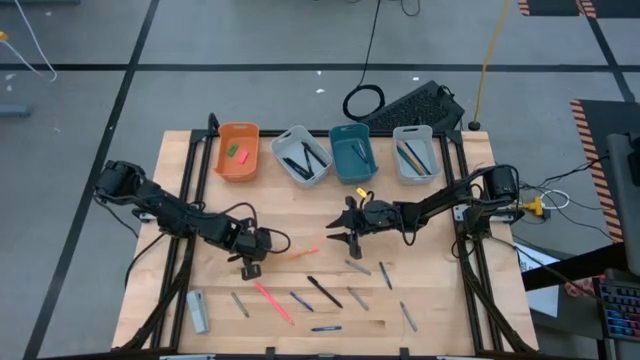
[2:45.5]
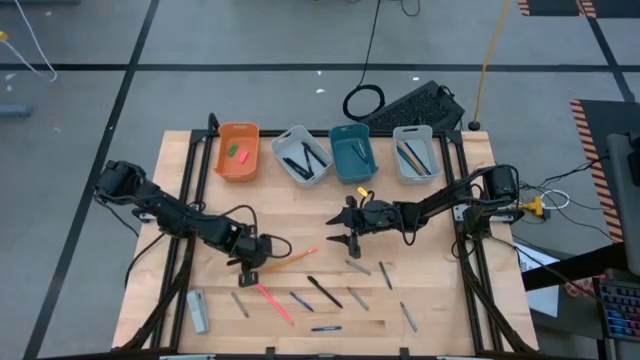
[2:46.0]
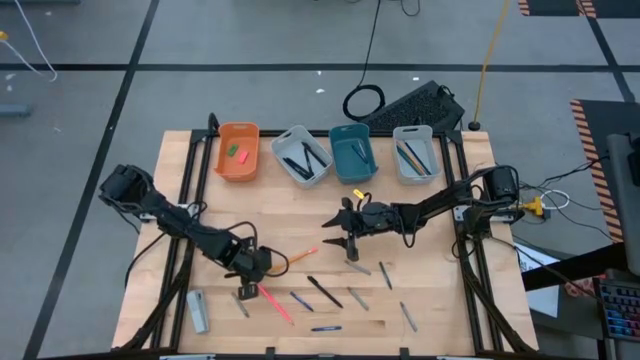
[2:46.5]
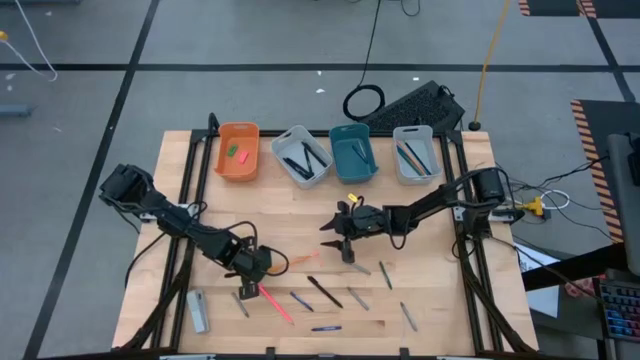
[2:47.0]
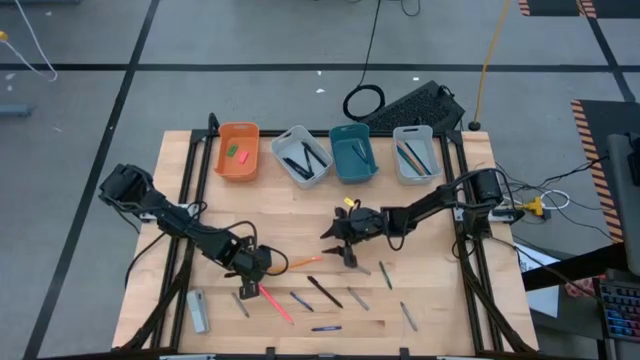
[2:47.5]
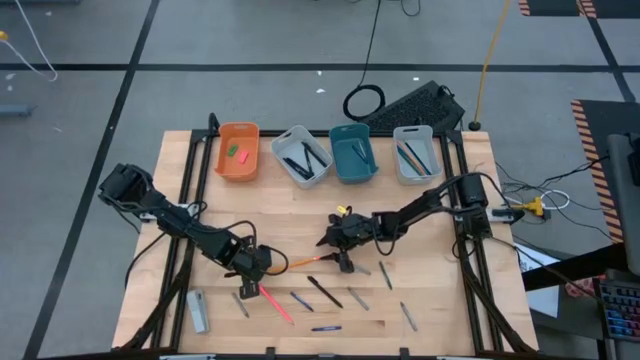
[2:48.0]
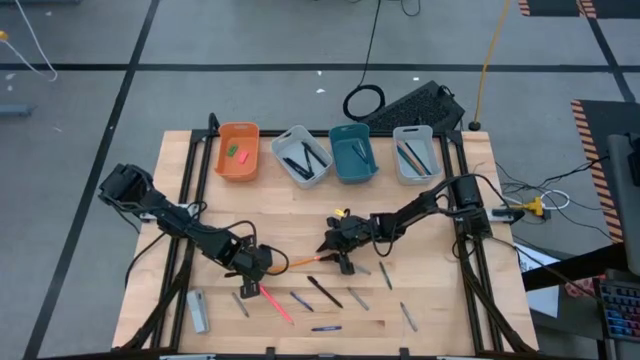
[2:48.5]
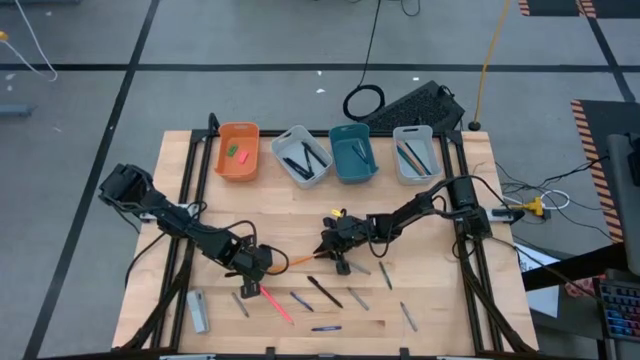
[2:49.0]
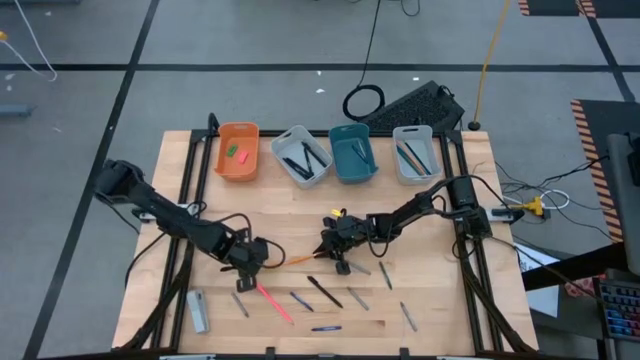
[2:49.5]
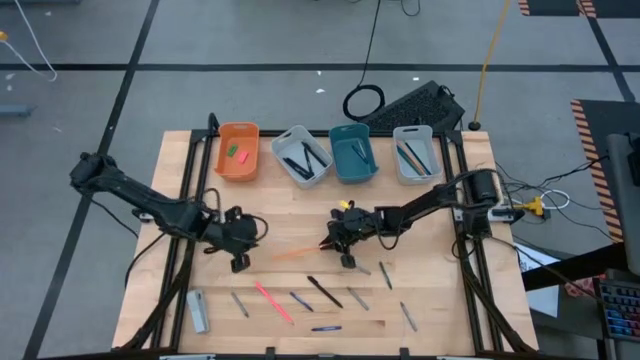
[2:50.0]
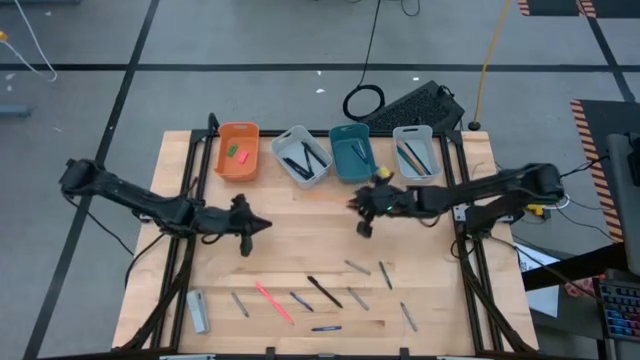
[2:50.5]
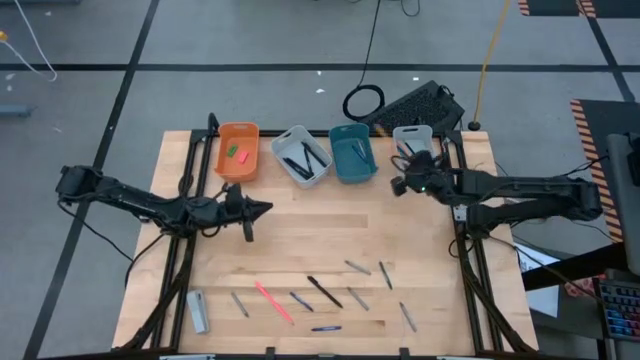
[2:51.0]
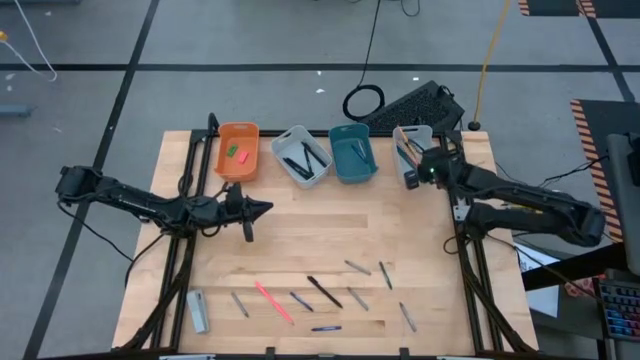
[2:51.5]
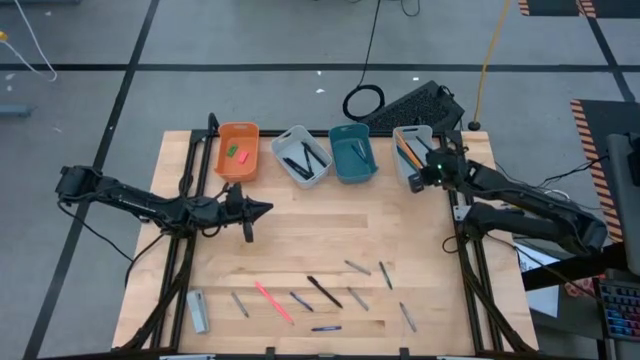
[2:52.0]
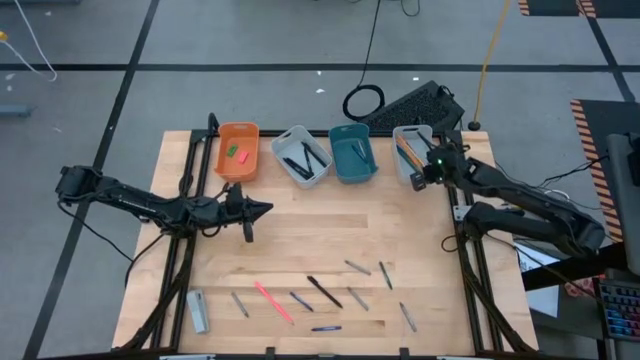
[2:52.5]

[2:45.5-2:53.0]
Task: Sort crayons/erasers/pens/pencils in bins
Put the orange pencil into the right gray bin

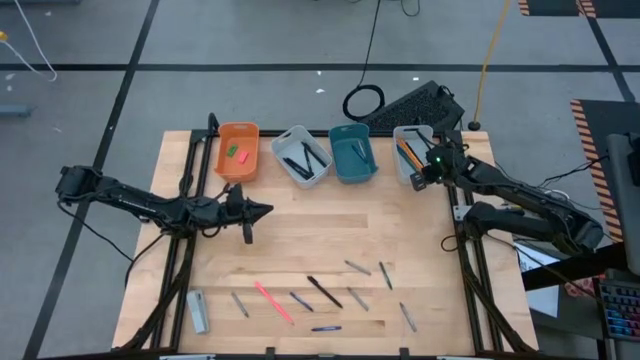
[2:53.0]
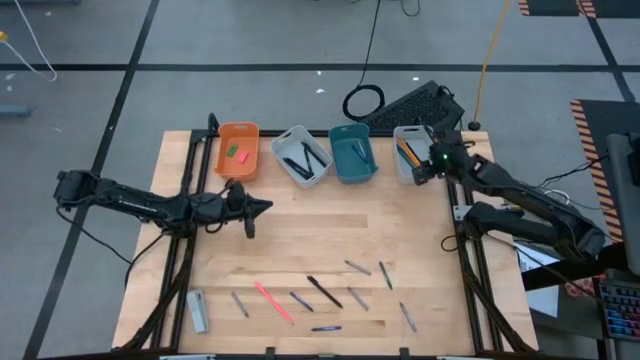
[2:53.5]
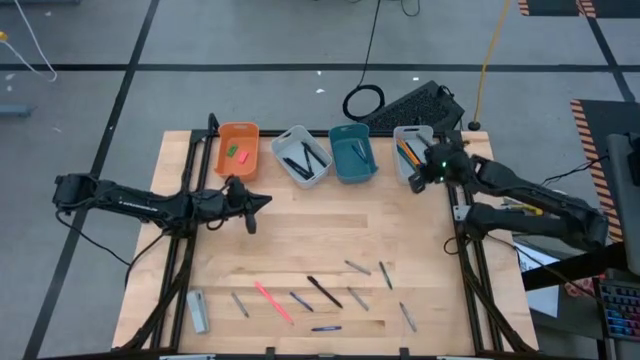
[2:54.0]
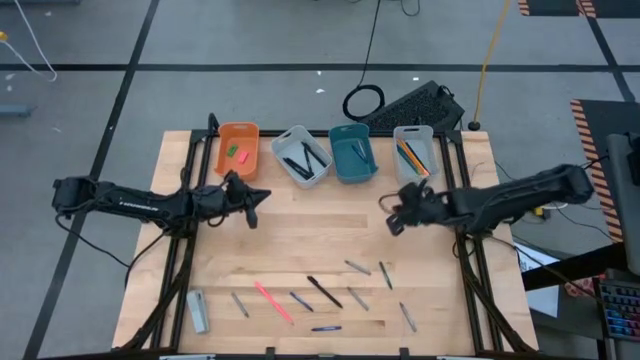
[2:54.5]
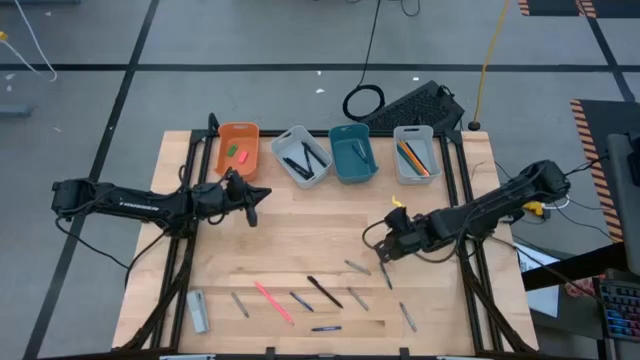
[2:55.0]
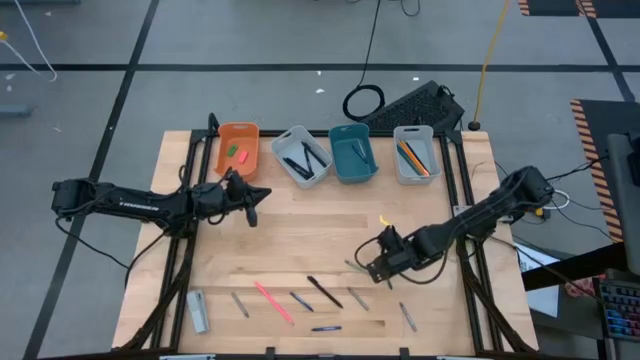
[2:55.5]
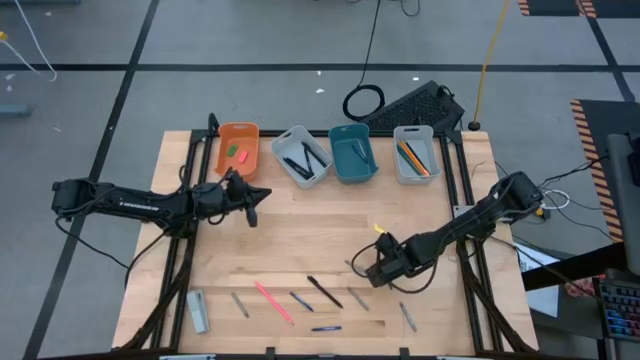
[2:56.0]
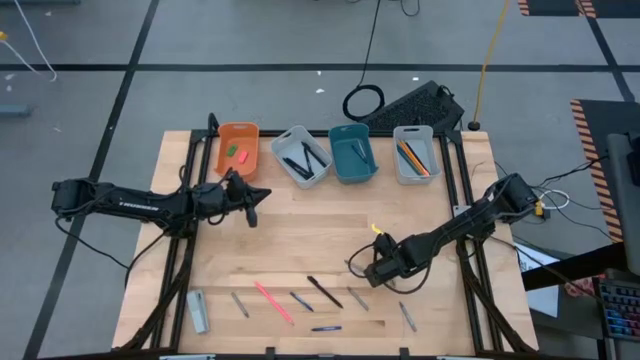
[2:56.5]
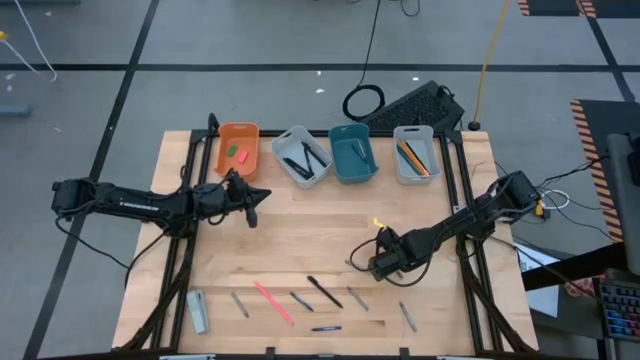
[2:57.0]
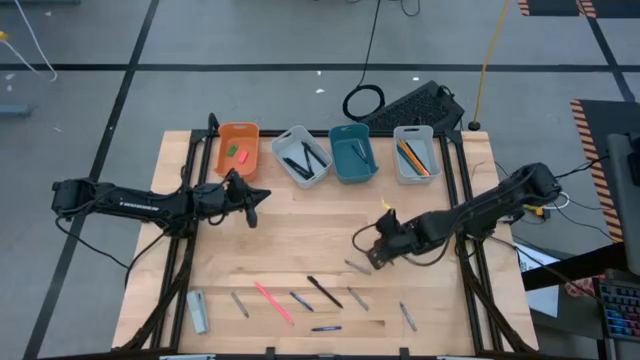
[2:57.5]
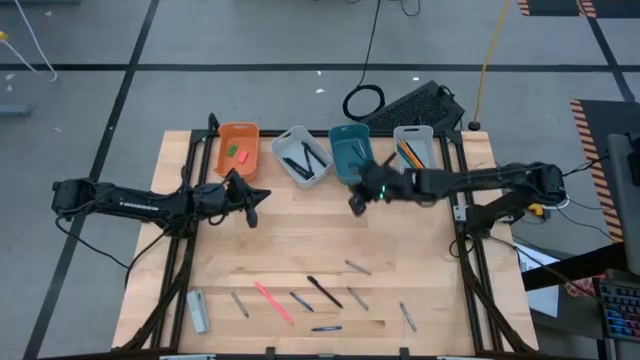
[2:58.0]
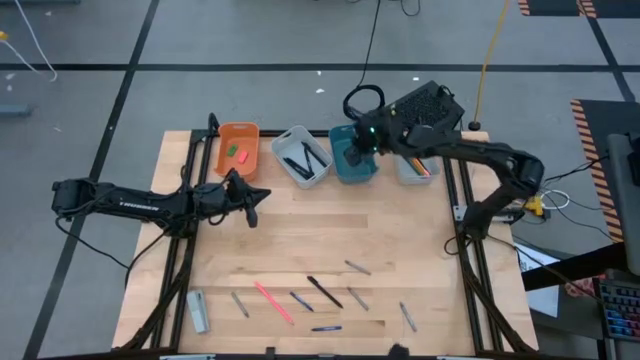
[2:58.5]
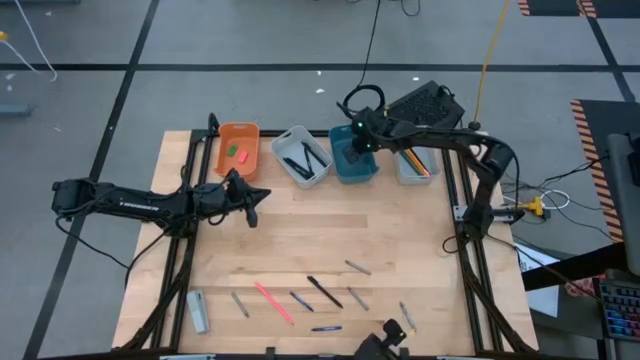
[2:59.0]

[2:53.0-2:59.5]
Put the dark green crayon into the blue bin

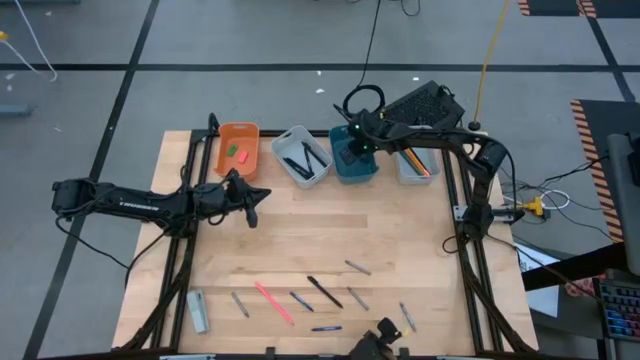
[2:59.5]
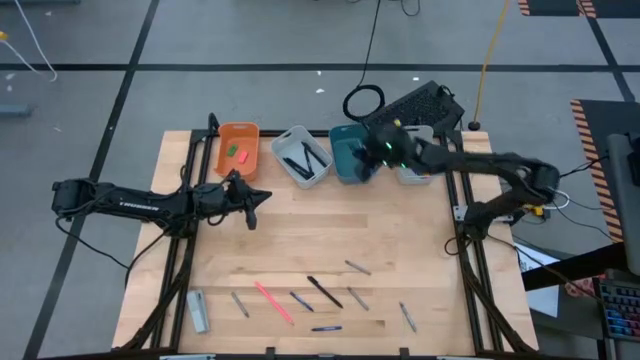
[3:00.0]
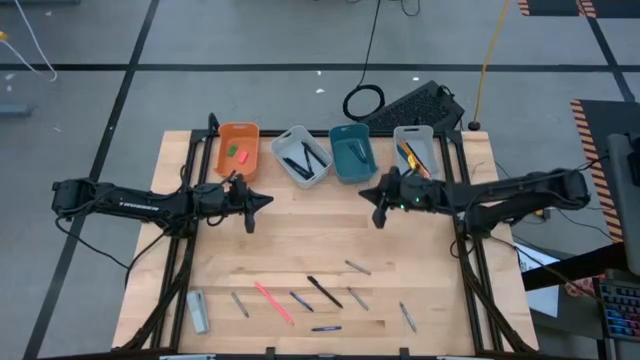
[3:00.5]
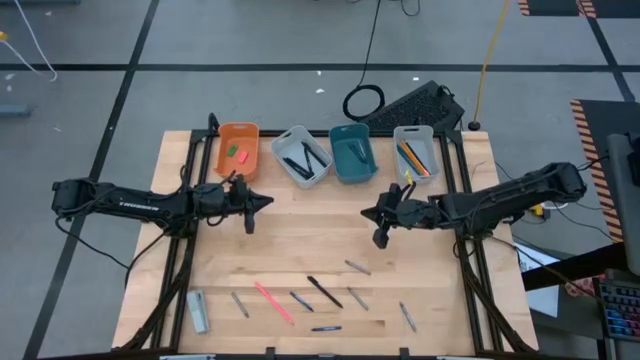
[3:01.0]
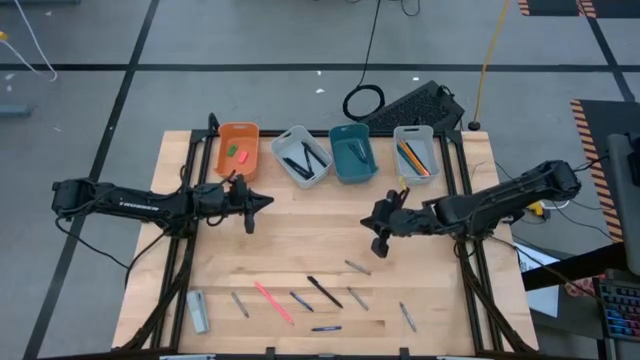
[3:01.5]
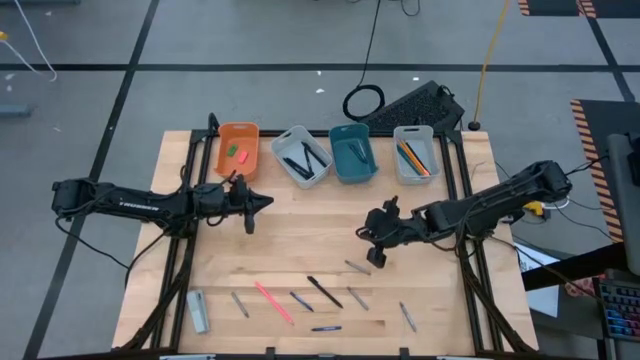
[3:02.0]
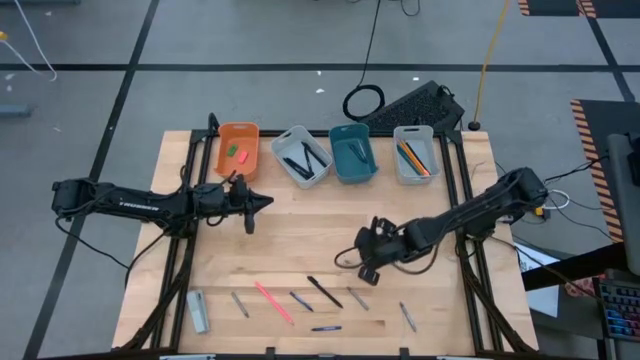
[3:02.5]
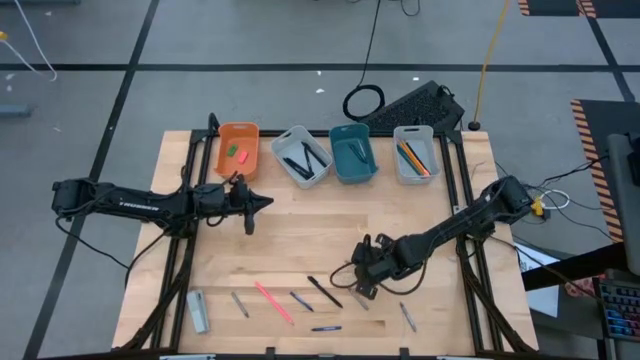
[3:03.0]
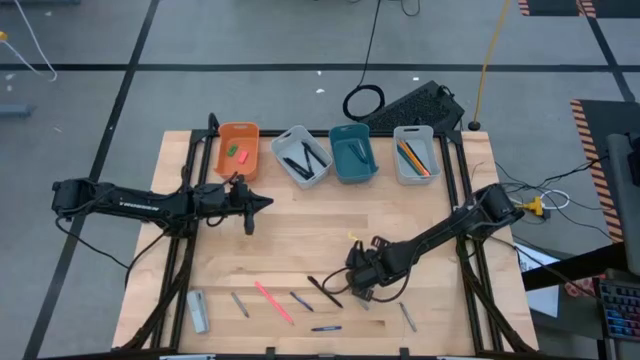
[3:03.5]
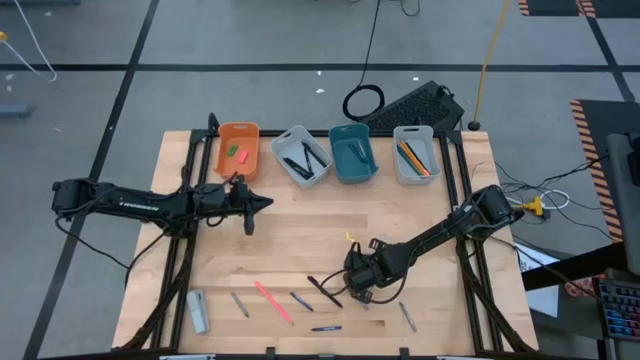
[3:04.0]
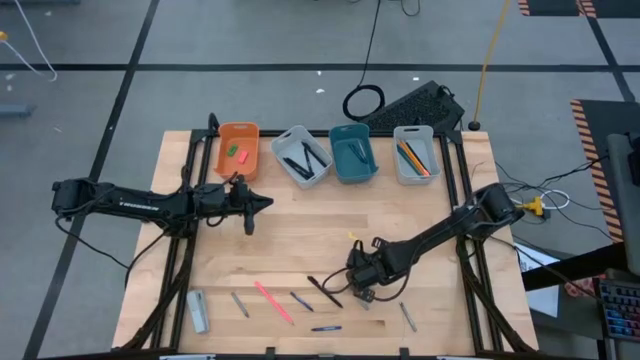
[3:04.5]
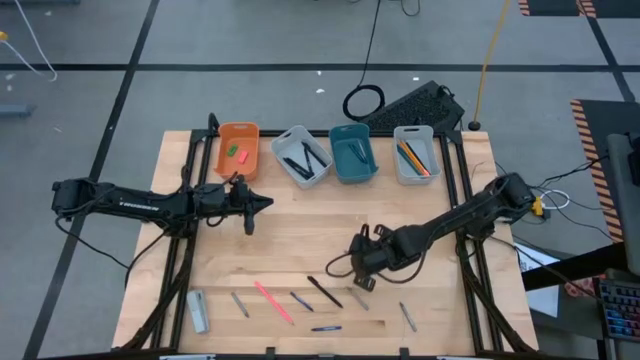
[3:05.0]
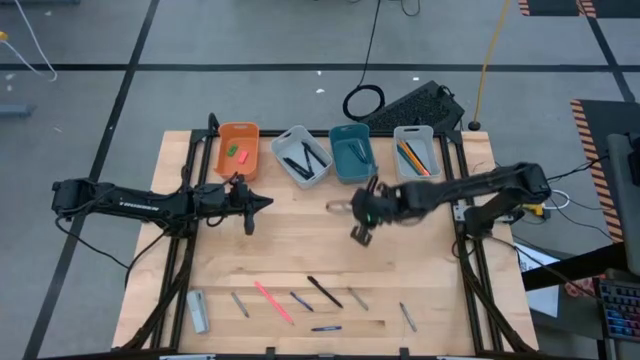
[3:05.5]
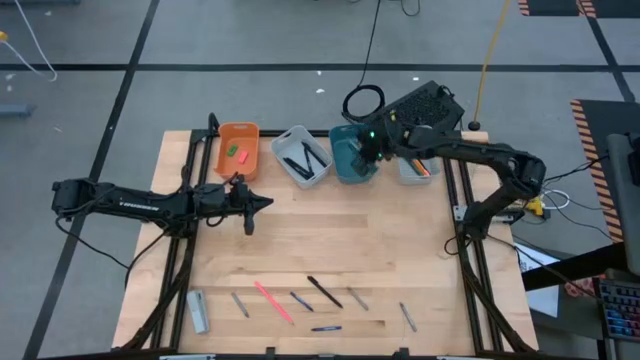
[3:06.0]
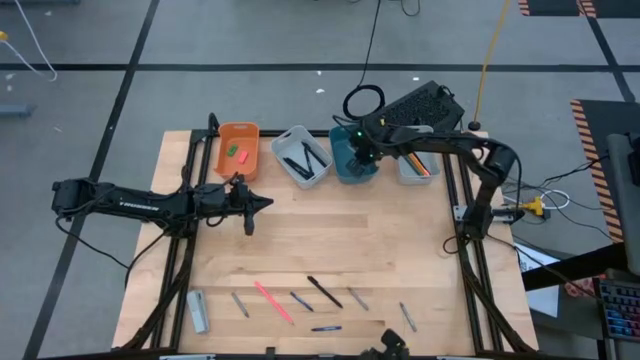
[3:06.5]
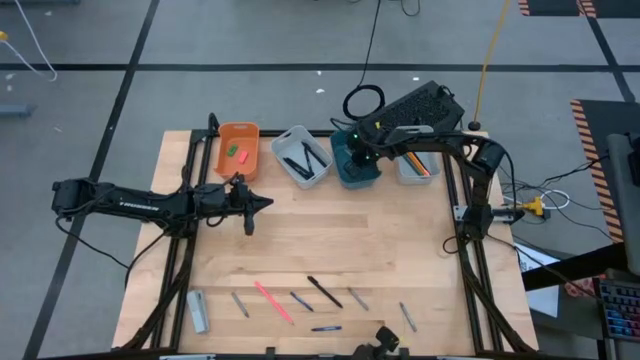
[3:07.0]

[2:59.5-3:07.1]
Put the gray crayon into the blue bin
